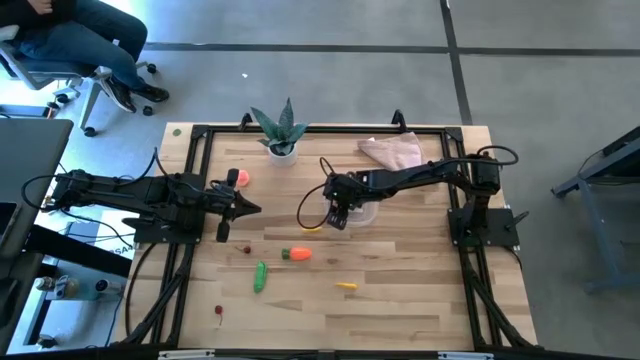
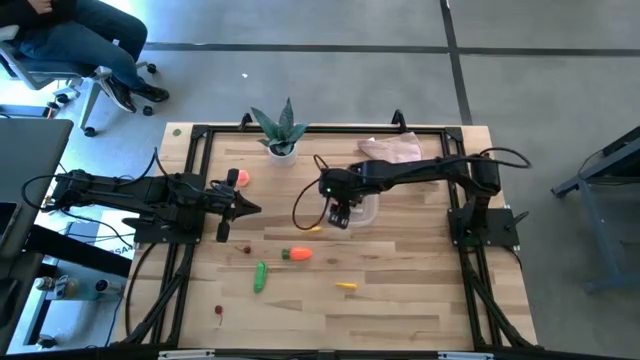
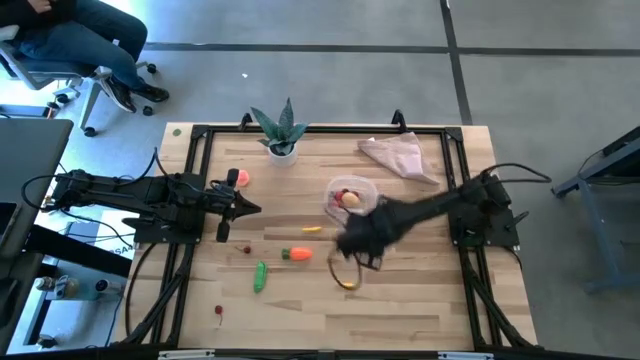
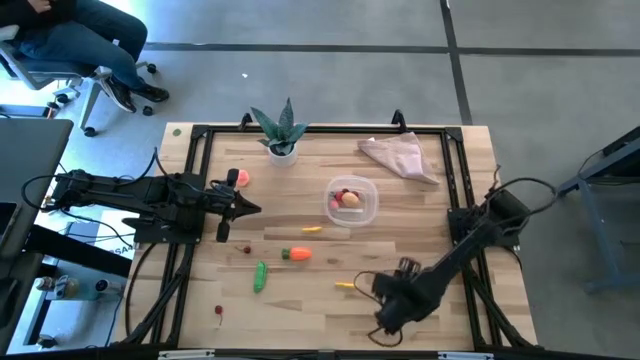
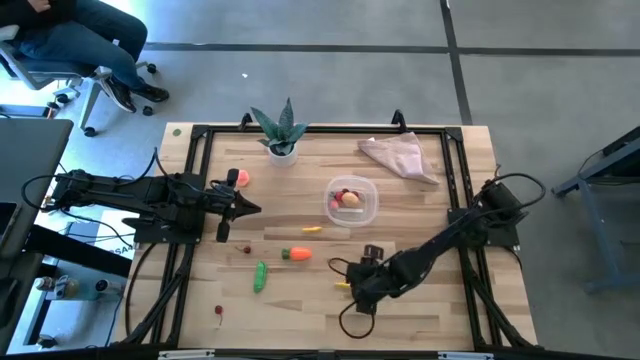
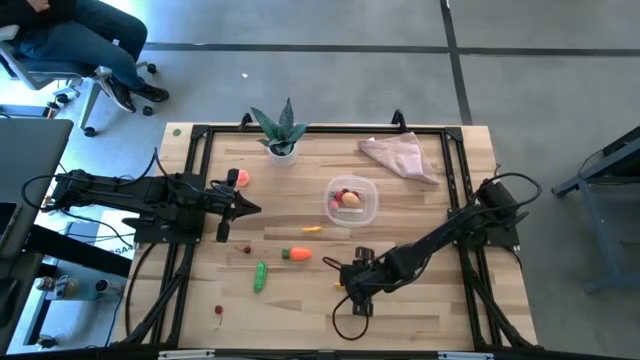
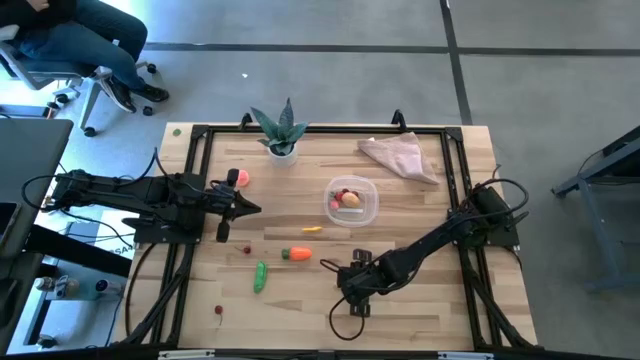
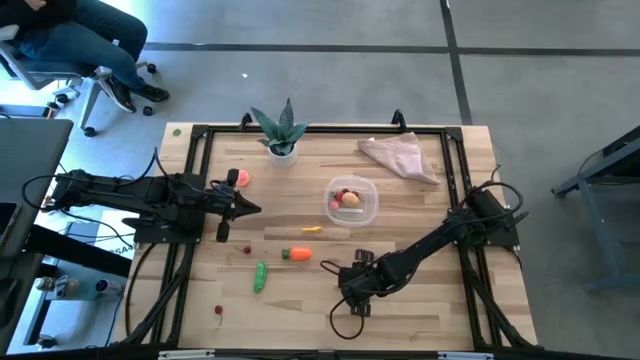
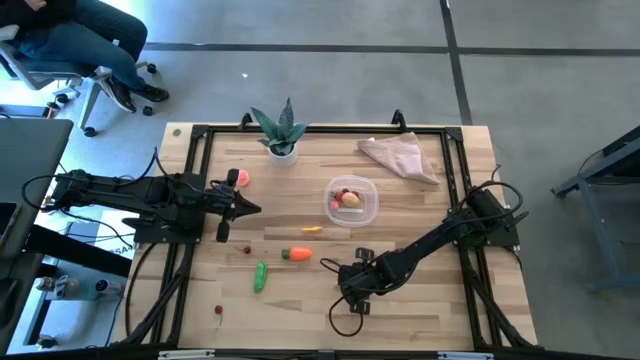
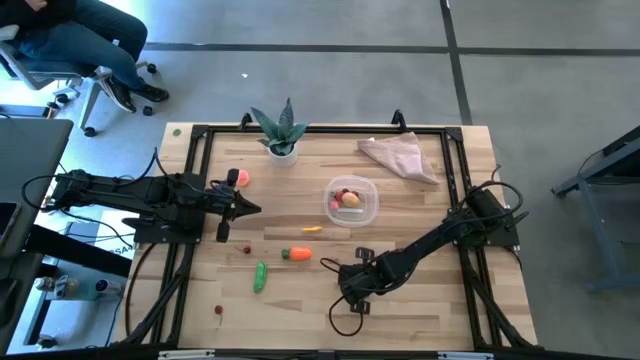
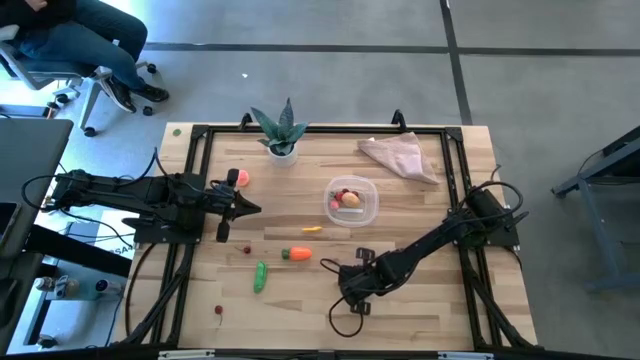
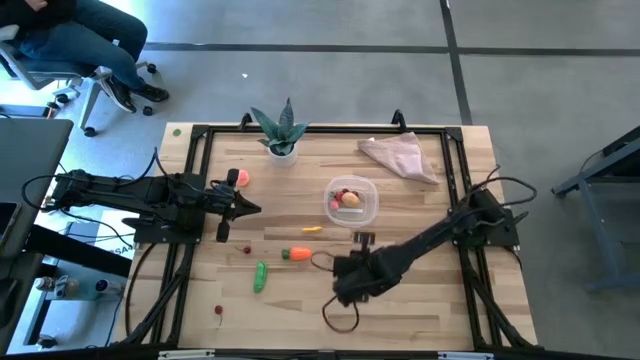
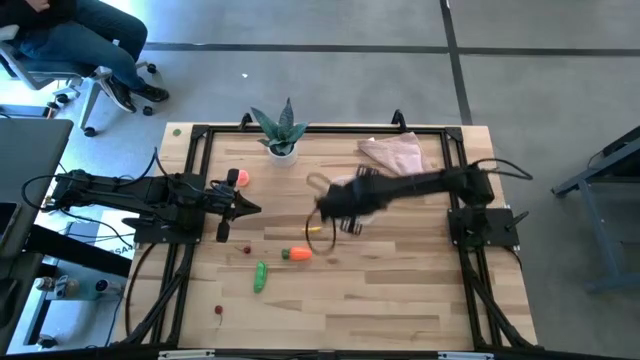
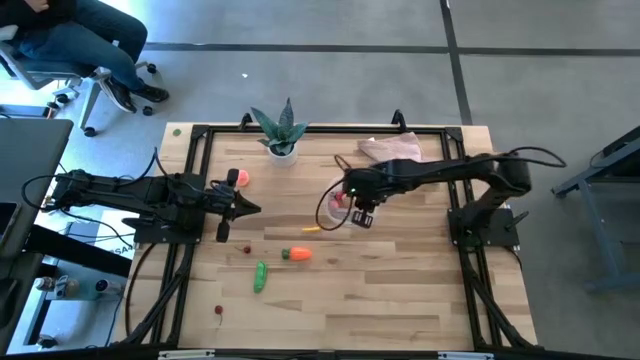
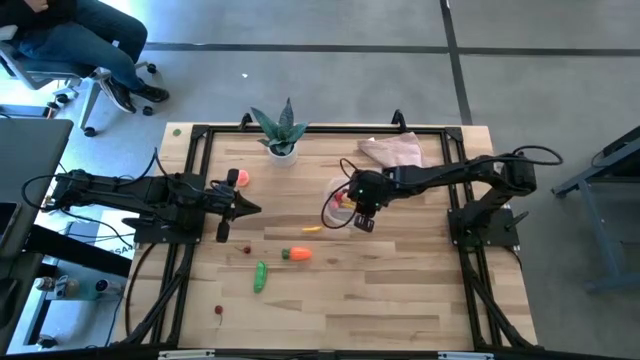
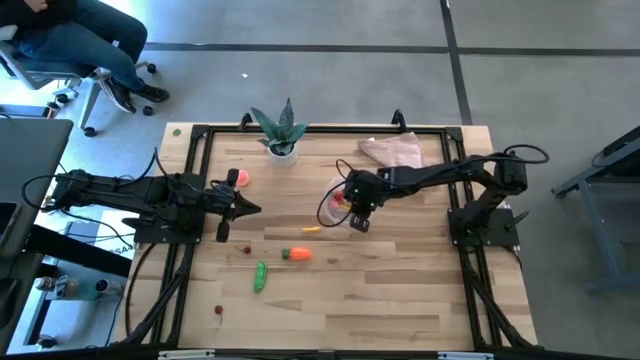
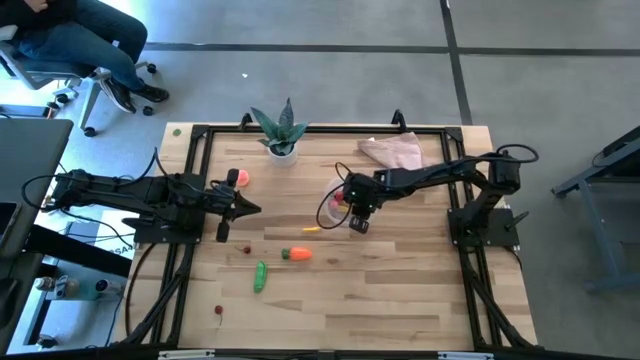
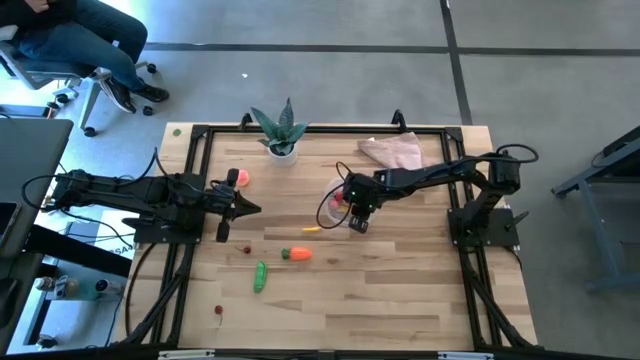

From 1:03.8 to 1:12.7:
Task: Pick and placing Produce into tupperware
Put the yellow corn into the transparent bin

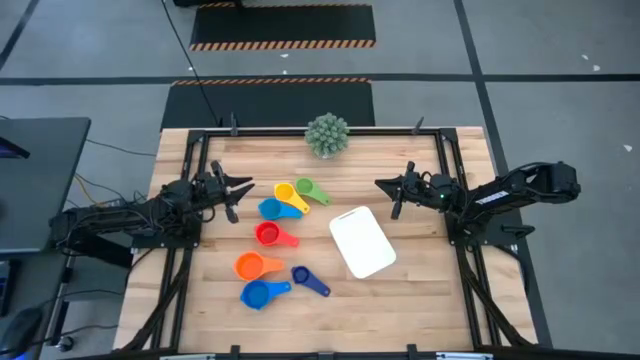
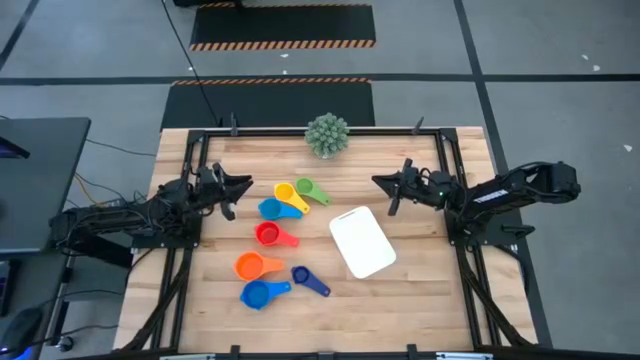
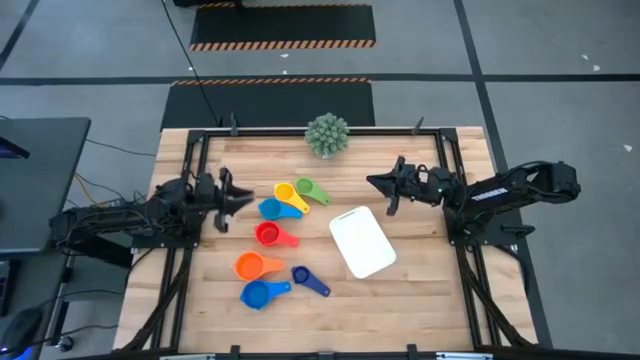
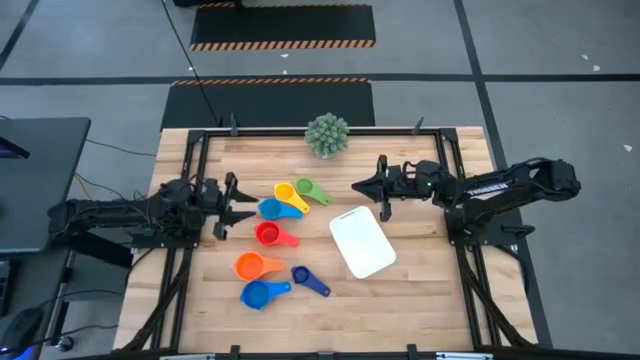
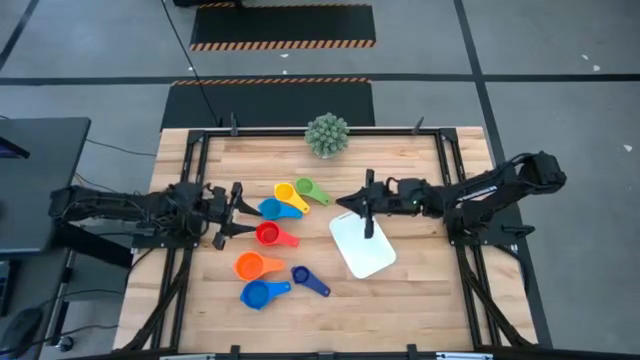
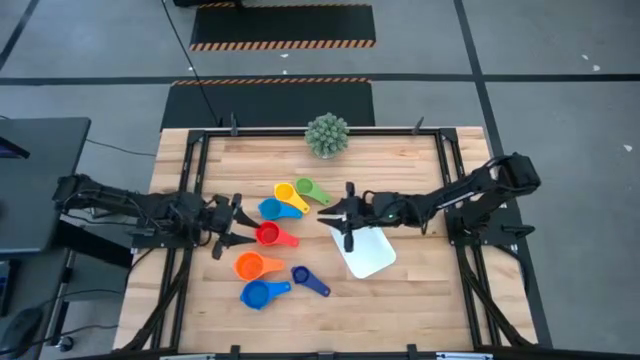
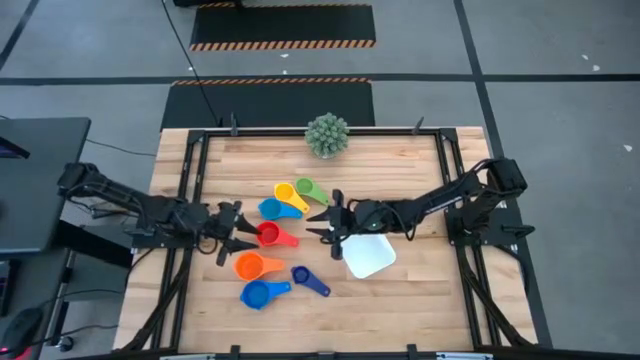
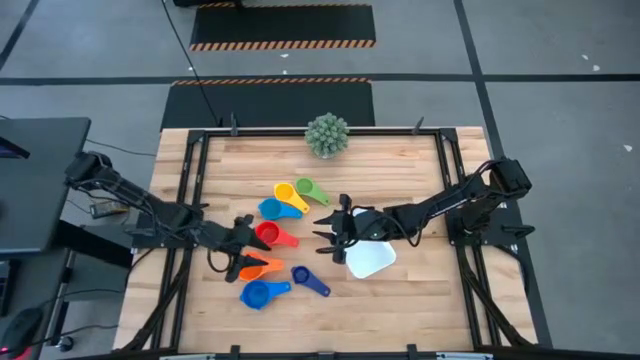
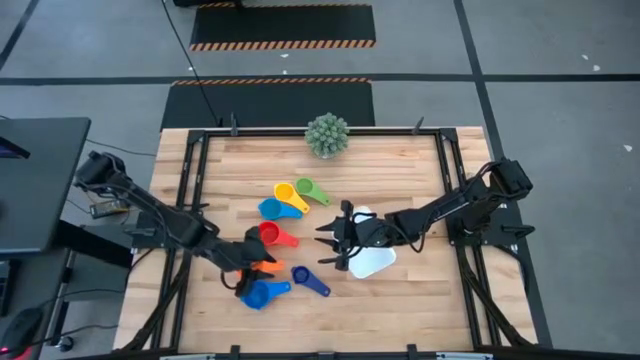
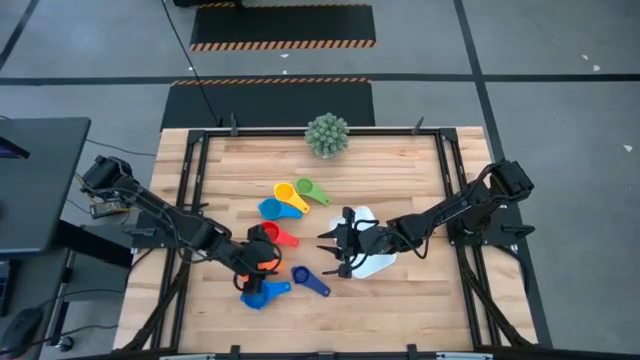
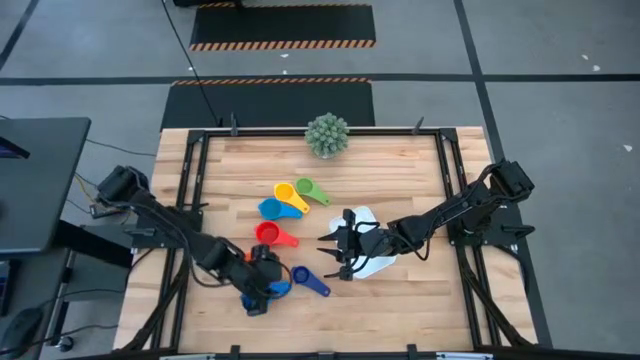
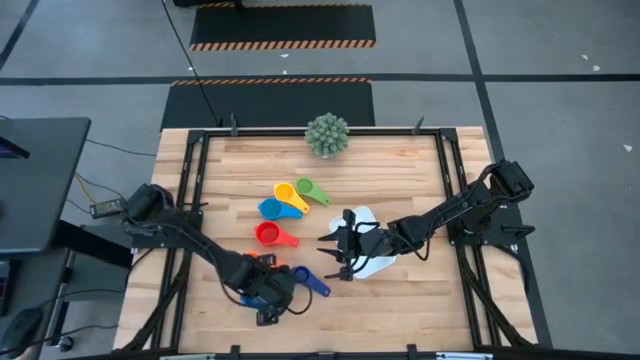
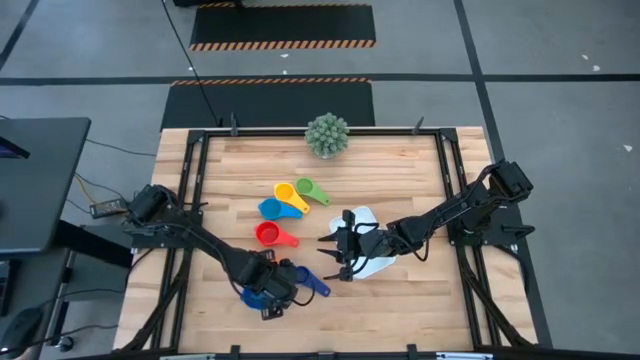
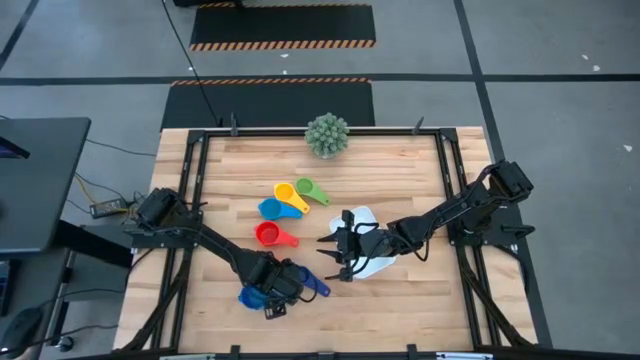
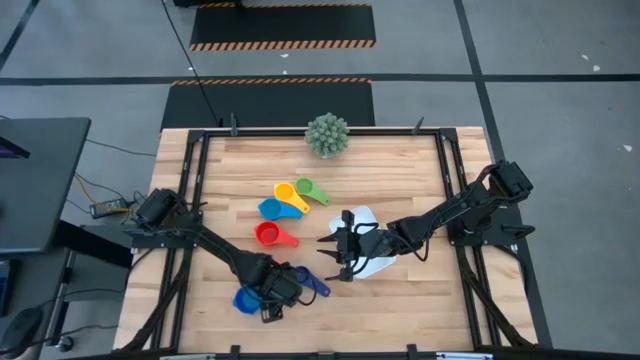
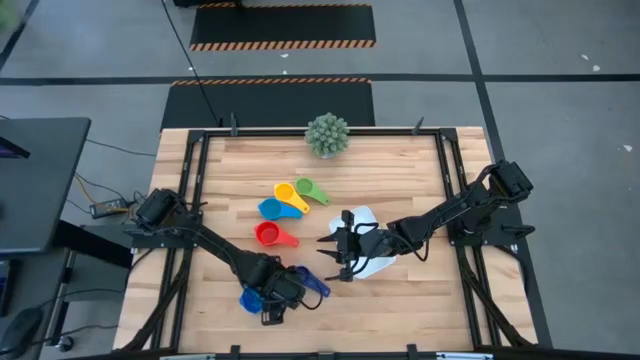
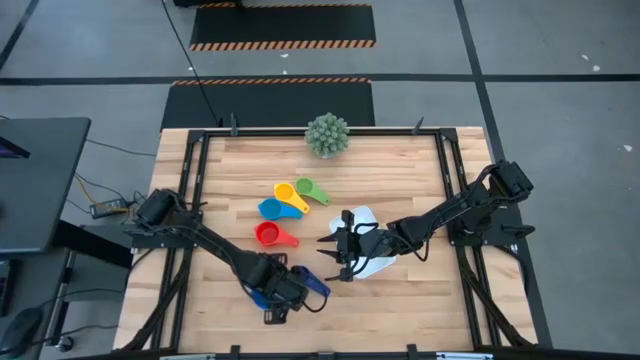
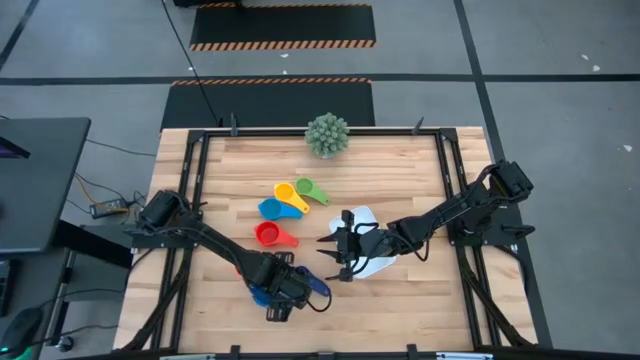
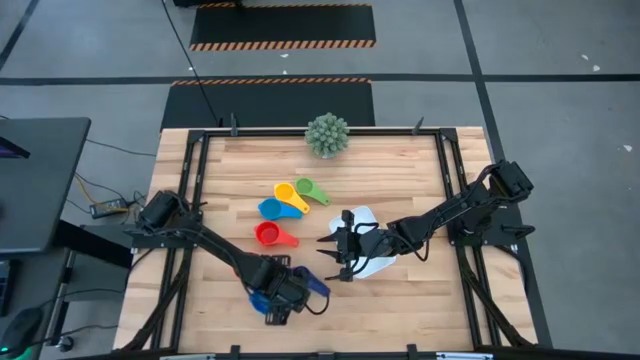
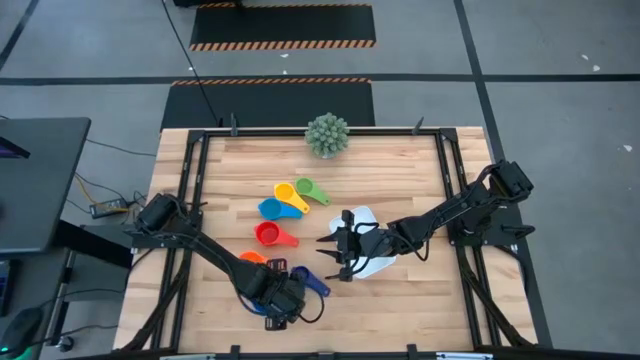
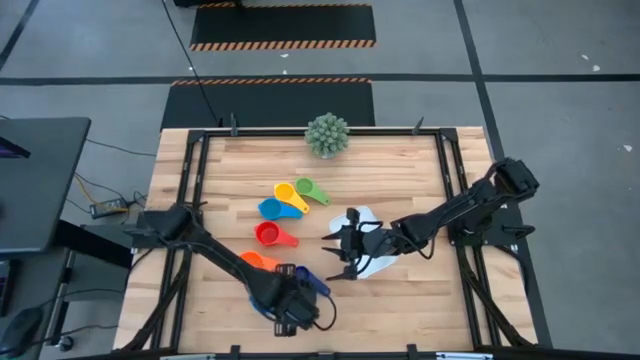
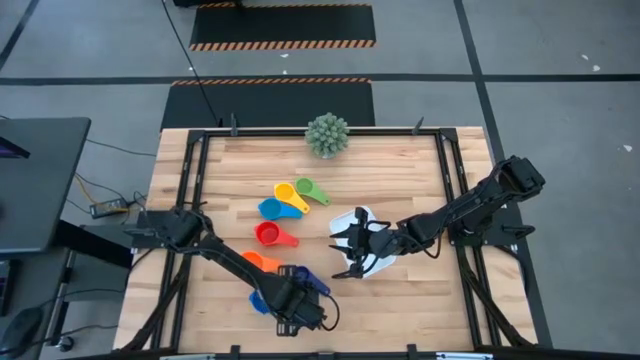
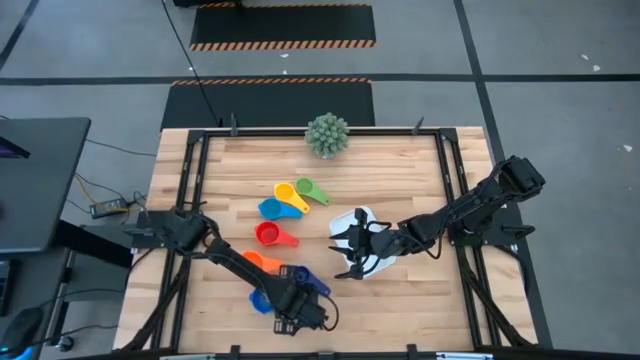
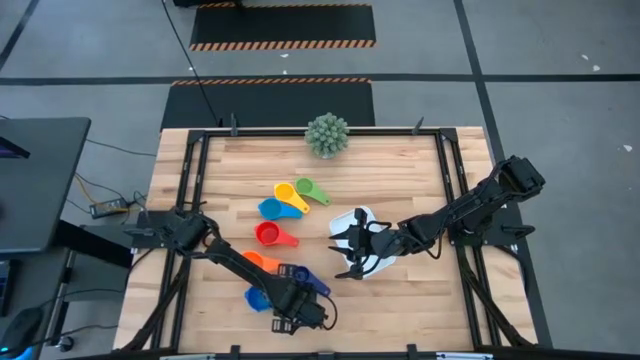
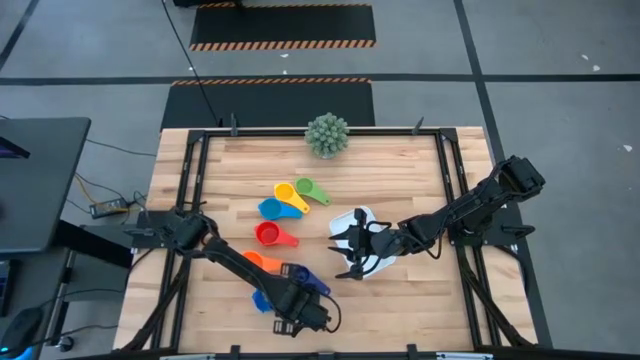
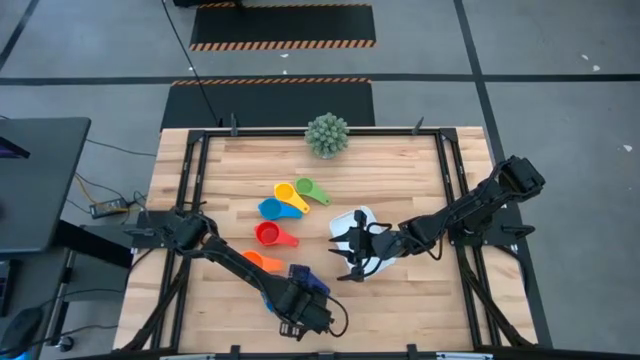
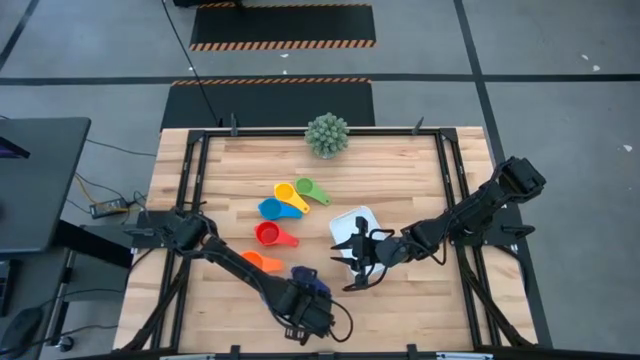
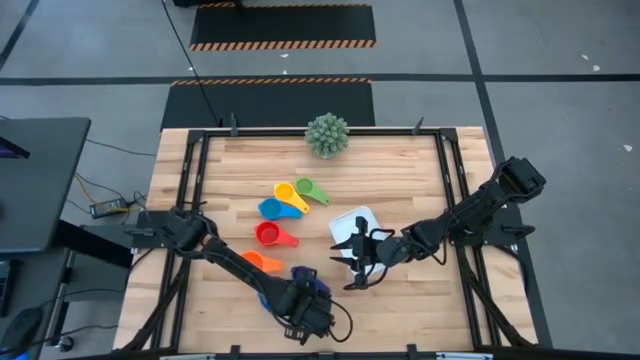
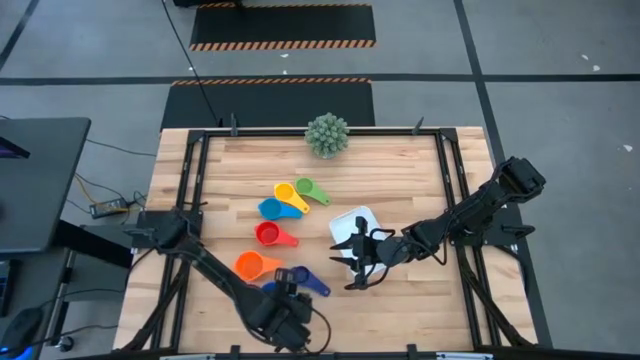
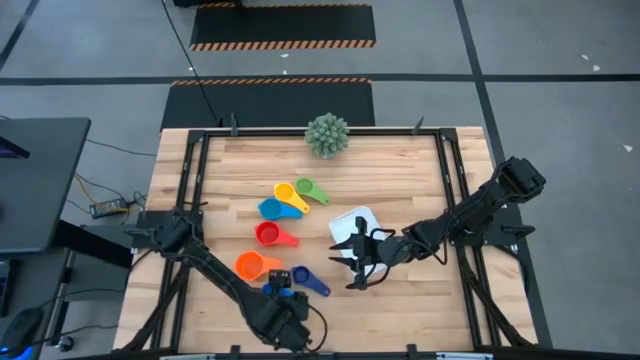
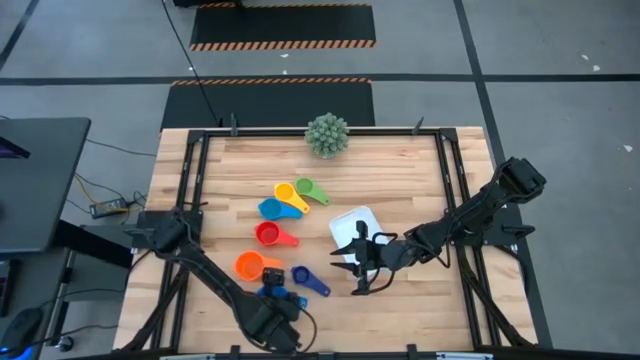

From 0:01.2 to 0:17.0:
Task: Nest measuring cups in basket
Stack the blue measuring cup on top of the orange measuring cup
